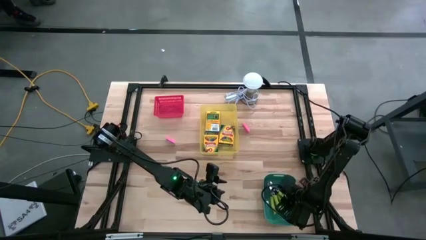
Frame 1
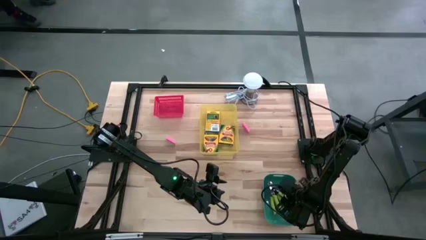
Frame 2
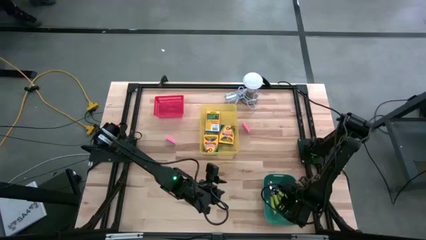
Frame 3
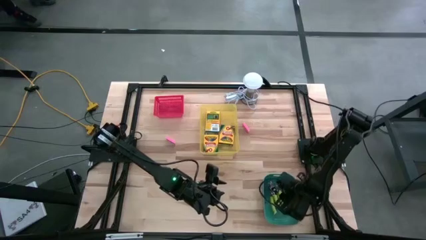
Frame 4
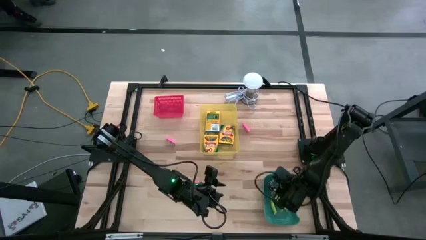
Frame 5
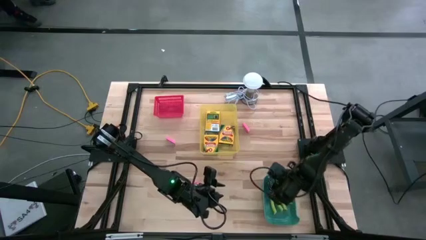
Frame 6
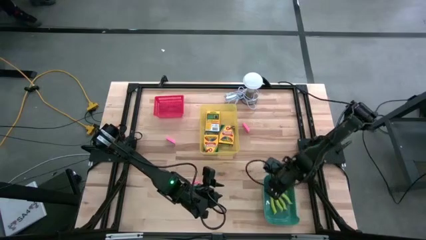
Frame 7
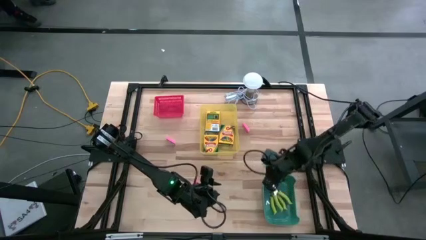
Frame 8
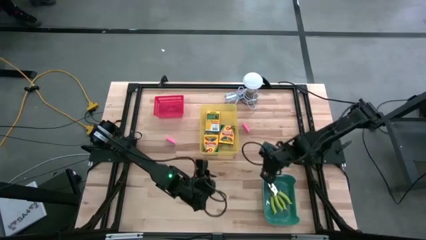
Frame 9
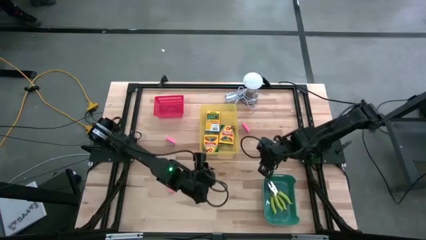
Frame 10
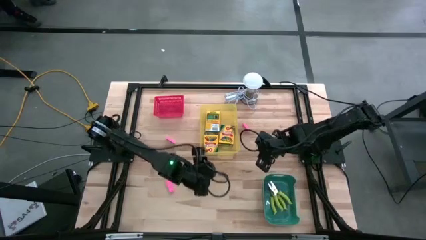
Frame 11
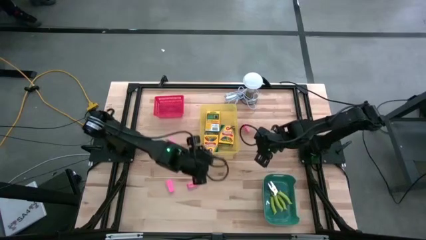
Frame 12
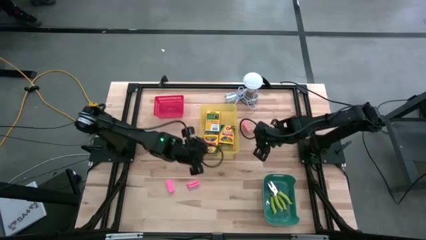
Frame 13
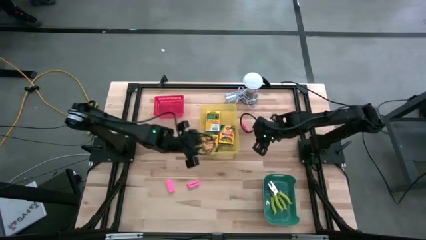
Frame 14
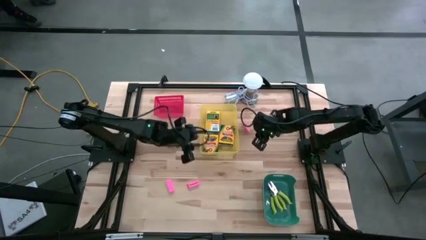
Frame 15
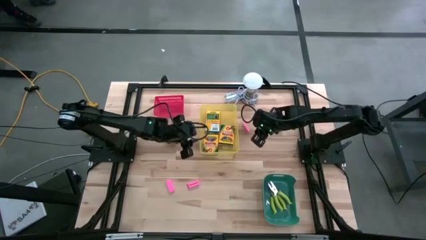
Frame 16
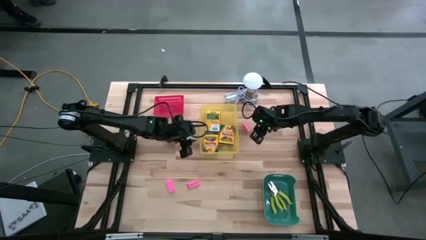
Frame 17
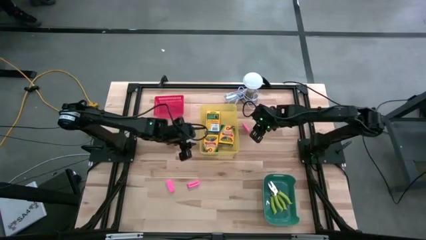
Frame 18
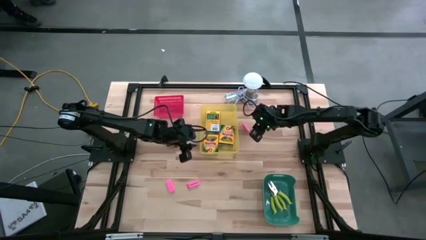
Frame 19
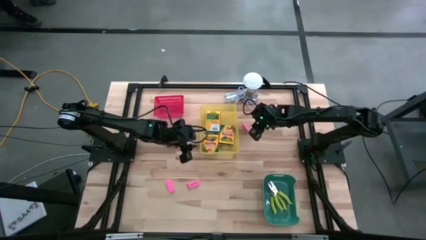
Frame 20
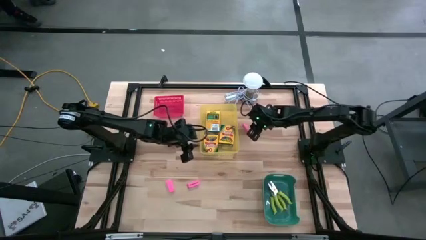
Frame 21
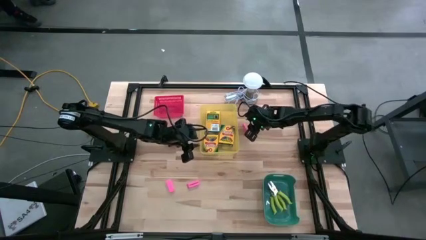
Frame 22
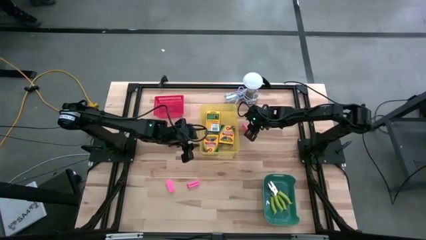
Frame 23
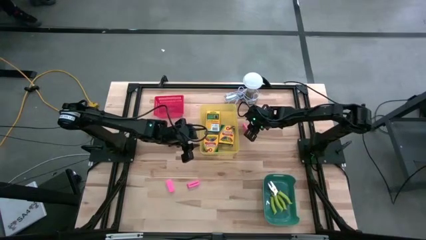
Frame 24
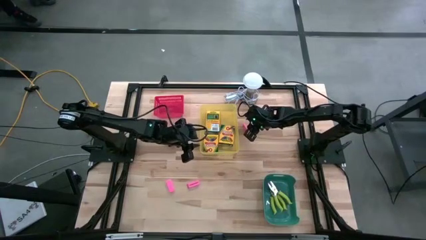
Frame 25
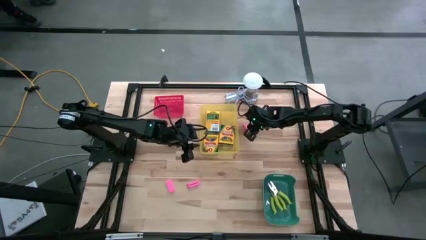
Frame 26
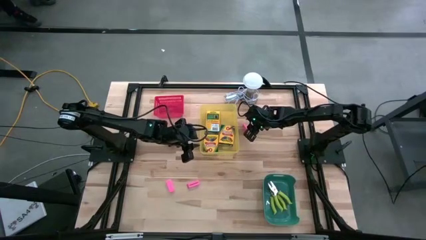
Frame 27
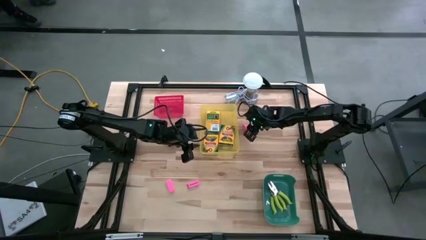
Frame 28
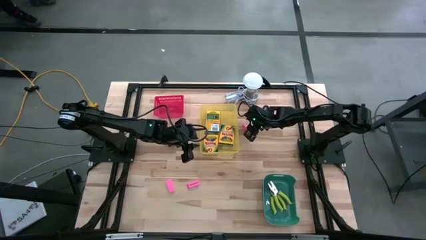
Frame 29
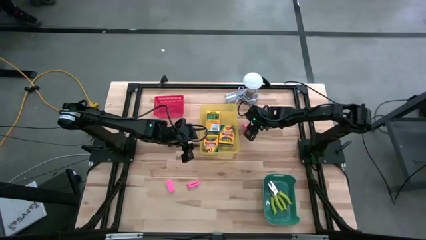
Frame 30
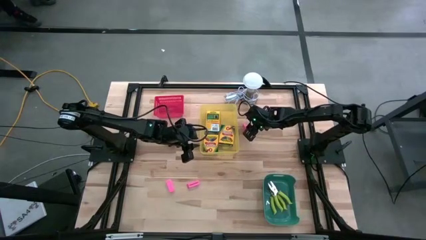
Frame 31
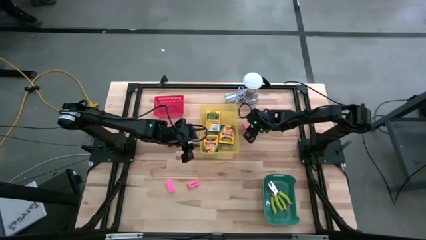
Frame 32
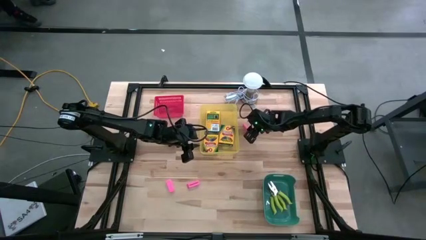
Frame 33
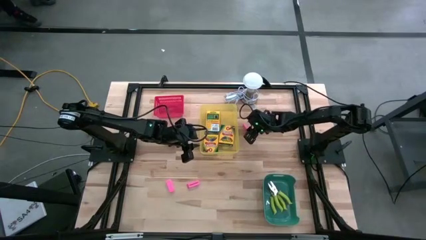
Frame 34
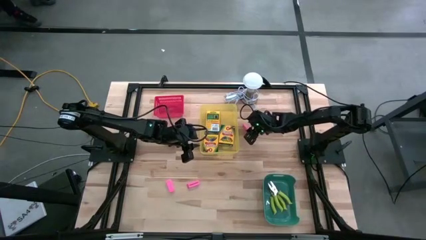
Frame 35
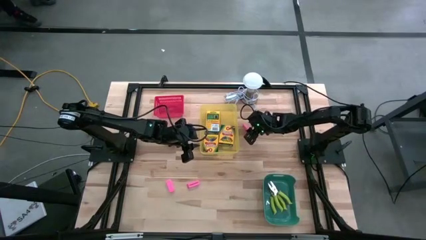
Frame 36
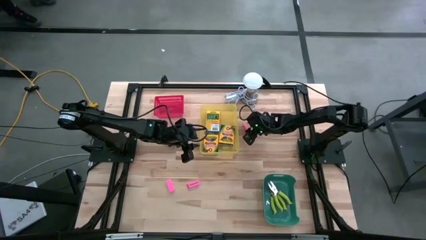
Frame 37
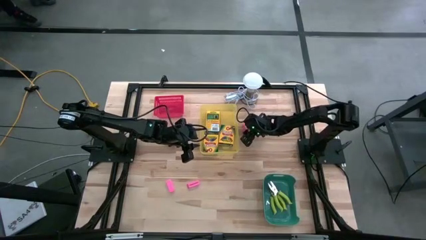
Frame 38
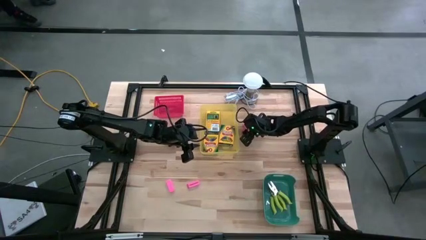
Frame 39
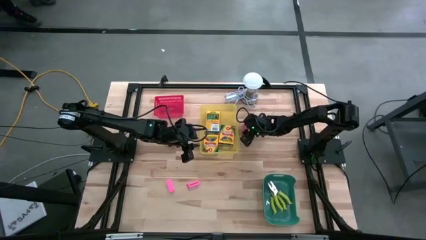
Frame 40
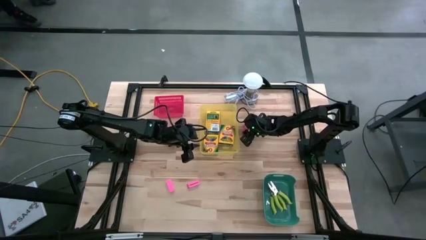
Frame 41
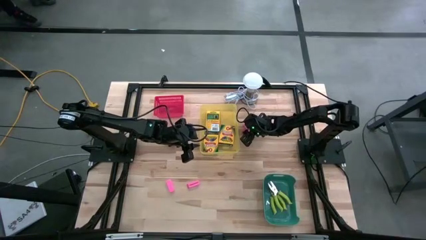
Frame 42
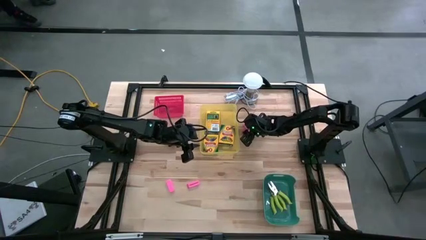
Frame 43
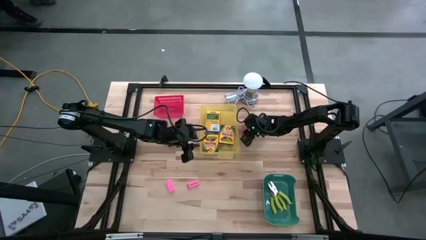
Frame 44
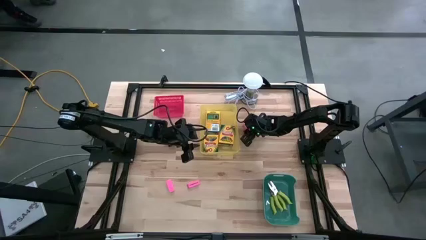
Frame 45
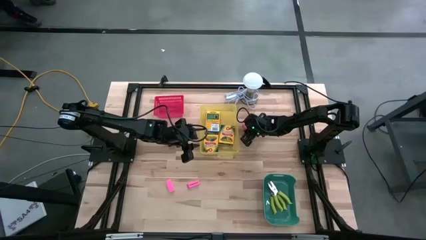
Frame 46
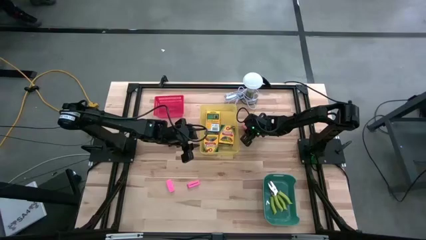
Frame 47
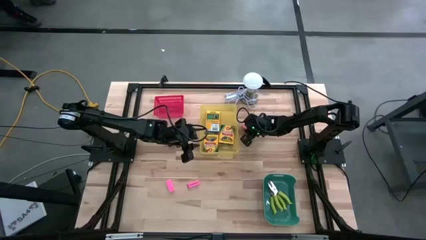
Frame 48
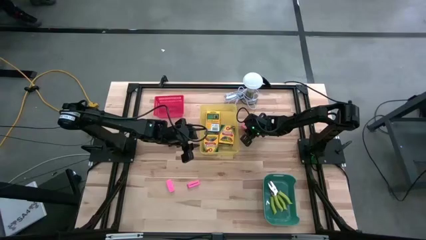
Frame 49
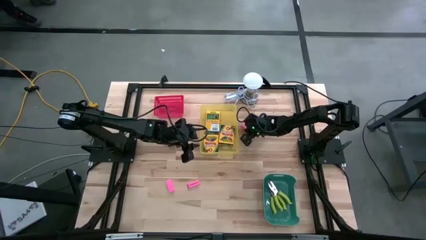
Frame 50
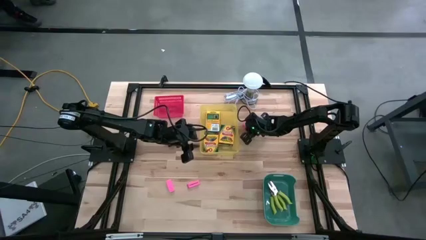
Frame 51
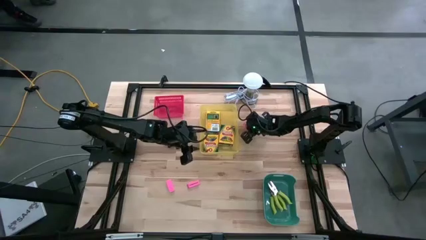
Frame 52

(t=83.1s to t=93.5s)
Task: Pick & Place School Supplies
Put the pink eraser into the red bin

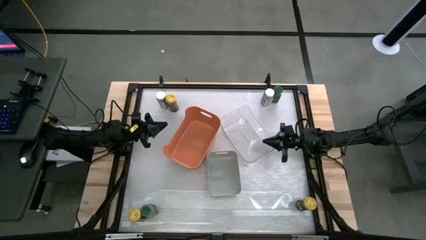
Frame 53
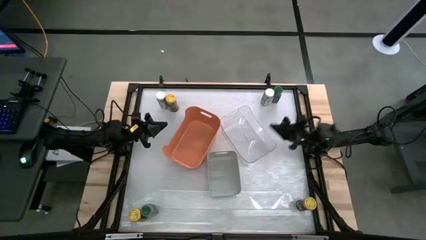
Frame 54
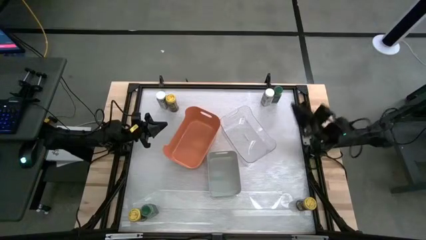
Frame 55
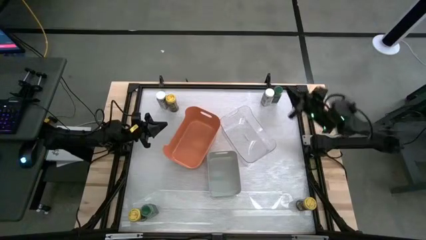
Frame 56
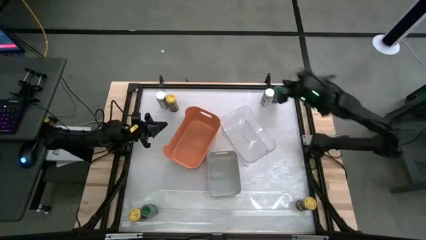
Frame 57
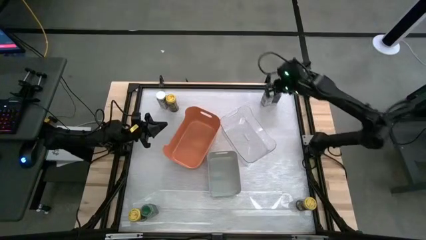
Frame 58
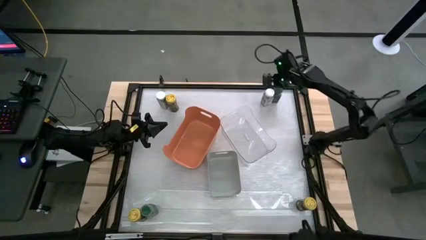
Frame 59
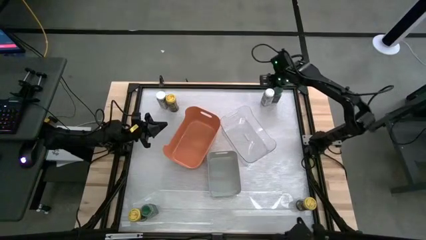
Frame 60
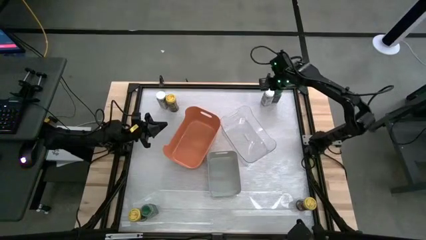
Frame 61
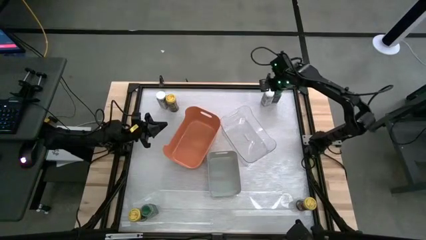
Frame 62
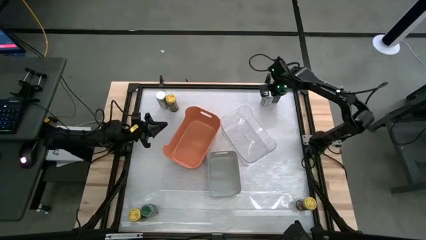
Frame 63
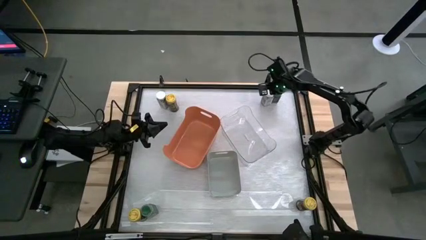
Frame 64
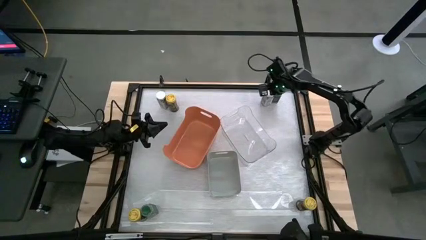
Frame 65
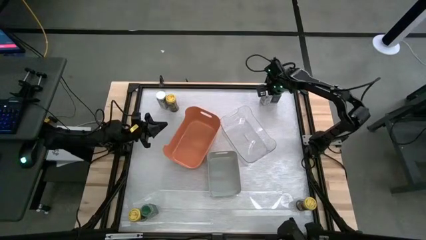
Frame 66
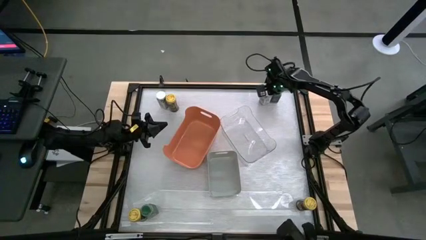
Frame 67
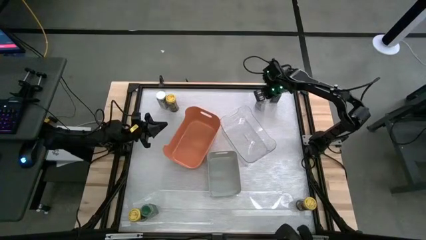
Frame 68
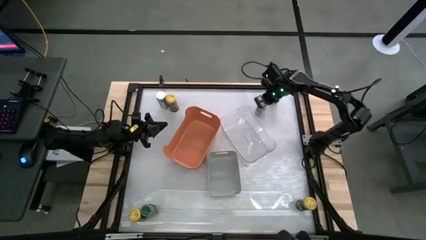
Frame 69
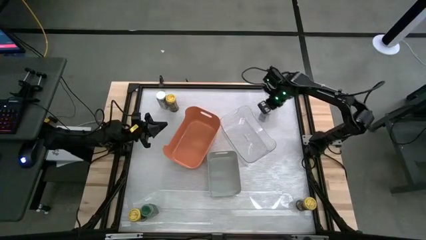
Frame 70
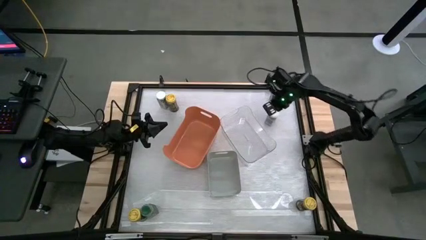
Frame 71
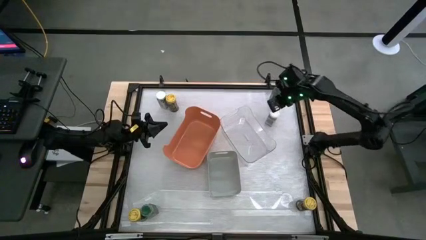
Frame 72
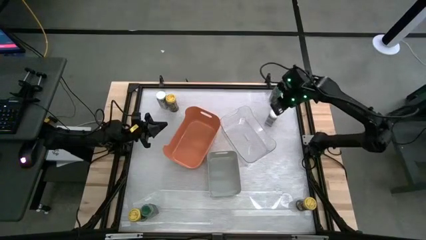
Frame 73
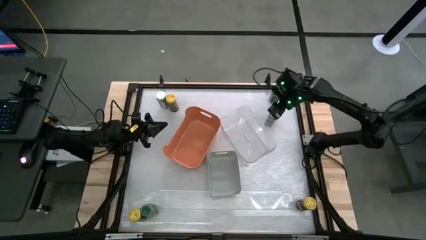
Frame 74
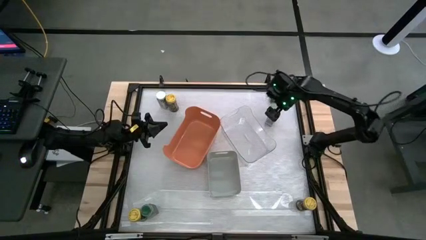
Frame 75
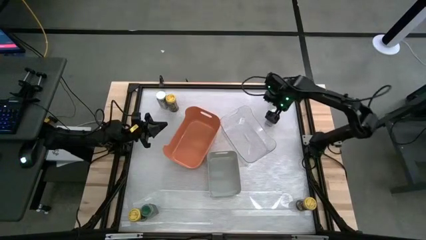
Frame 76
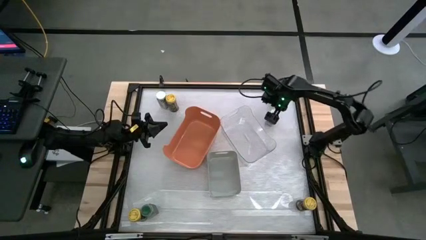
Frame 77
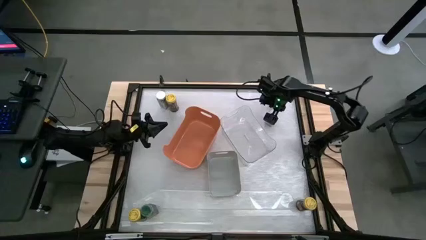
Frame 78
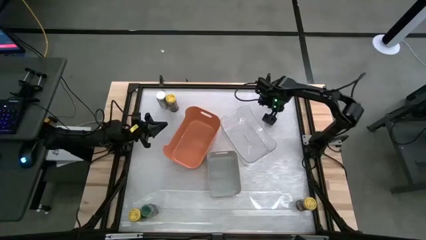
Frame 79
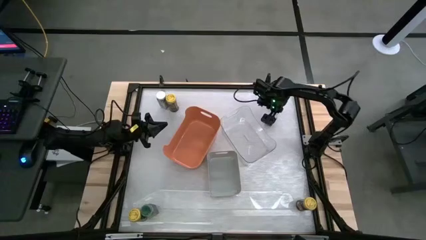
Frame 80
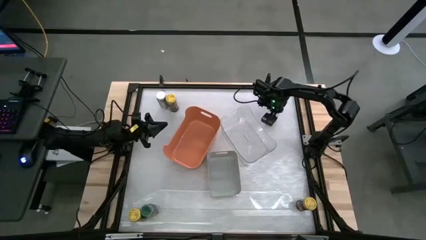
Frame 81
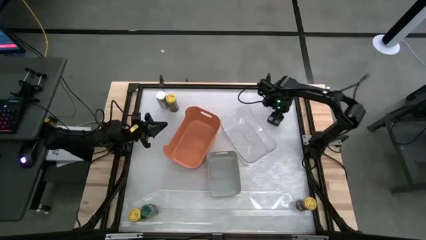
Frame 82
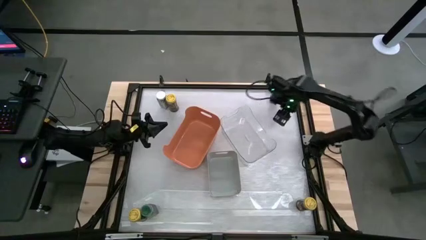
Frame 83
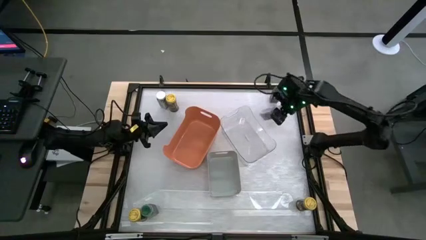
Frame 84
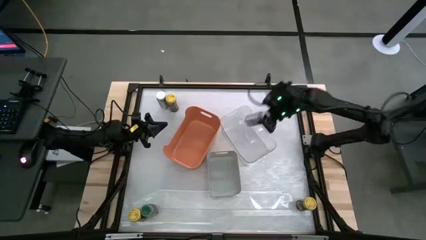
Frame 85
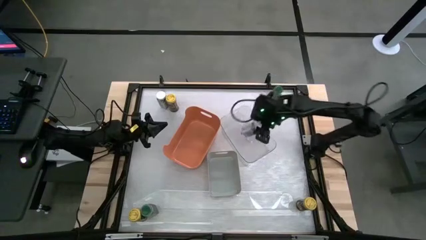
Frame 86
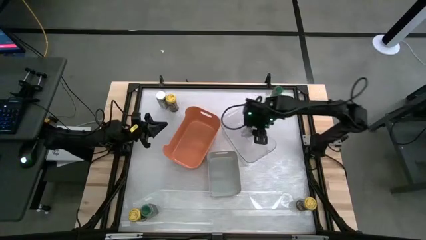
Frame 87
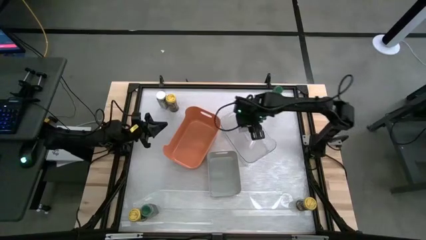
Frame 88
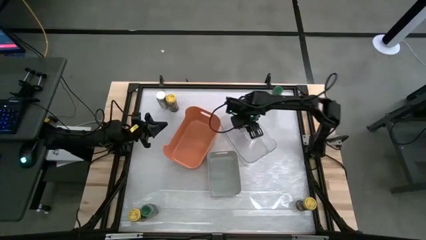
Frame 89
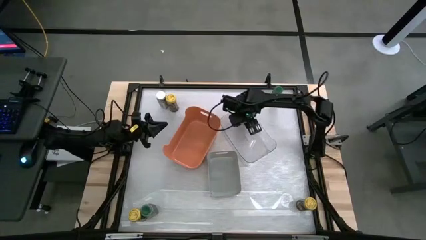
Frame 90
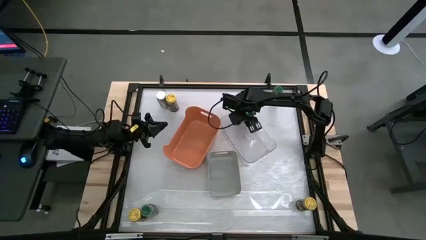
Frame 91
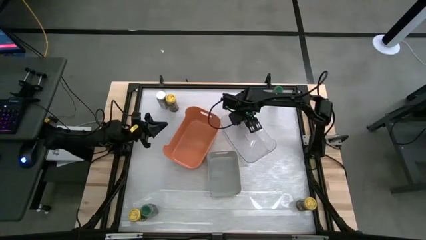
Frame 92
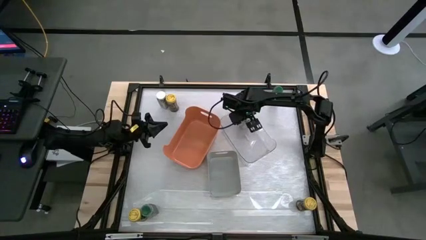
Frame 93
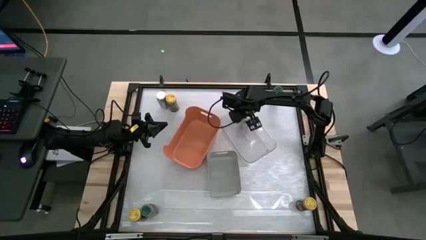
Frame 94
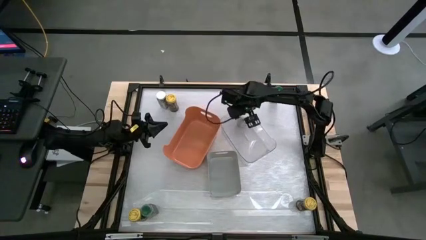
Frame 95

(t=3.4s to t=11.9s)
Task: Sort spices by type
Put the right white seasoning bottle into the transparent bin
